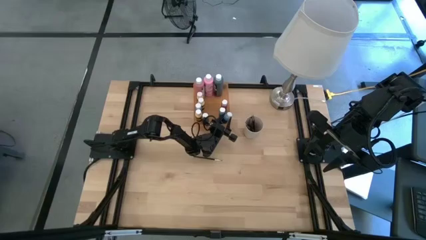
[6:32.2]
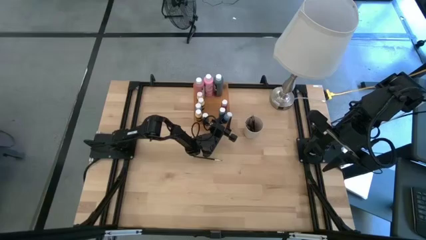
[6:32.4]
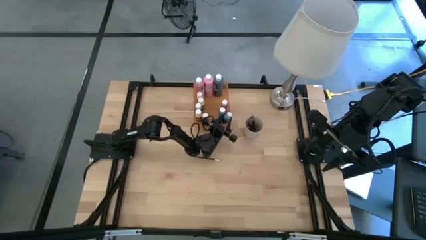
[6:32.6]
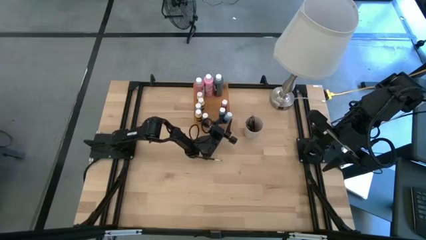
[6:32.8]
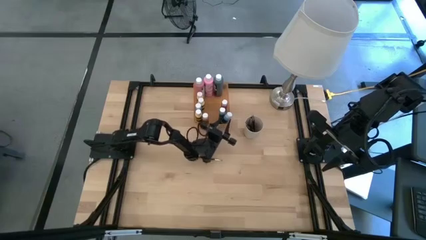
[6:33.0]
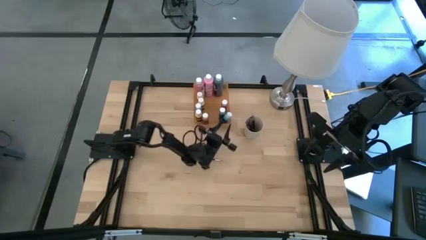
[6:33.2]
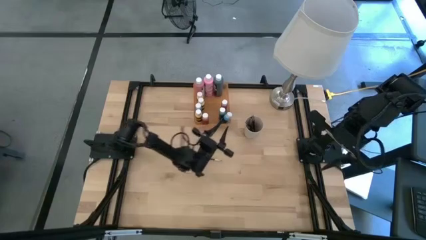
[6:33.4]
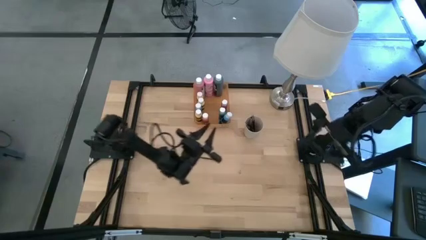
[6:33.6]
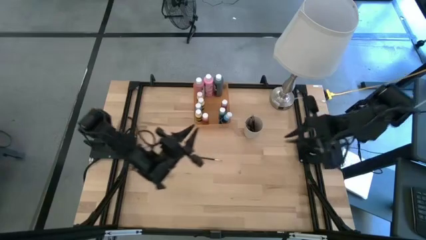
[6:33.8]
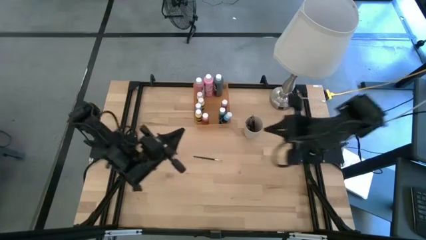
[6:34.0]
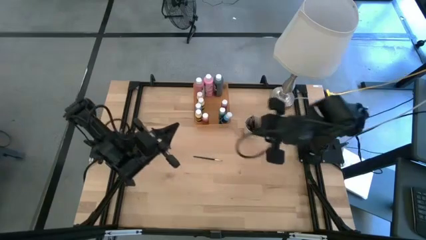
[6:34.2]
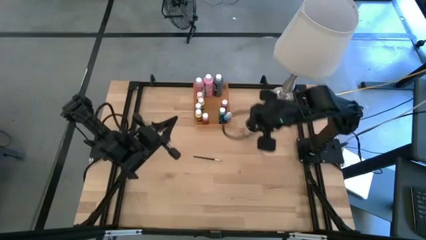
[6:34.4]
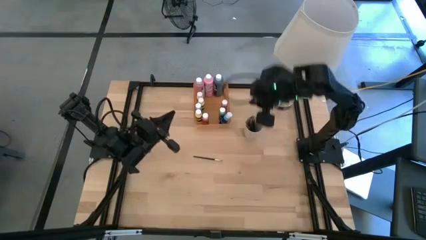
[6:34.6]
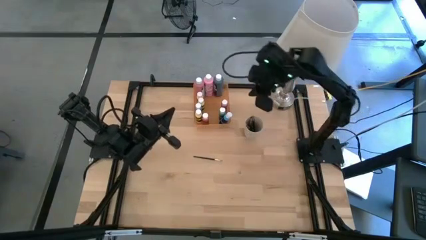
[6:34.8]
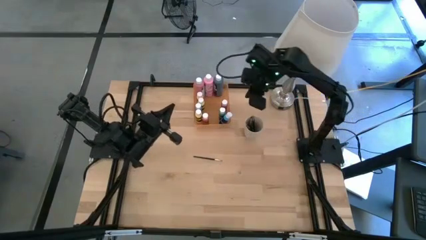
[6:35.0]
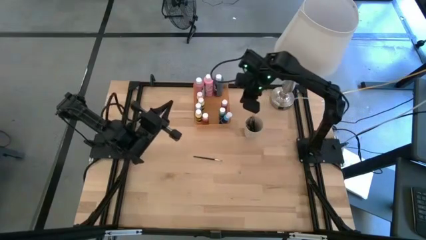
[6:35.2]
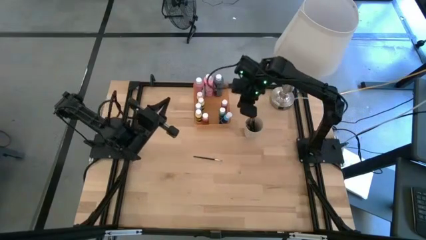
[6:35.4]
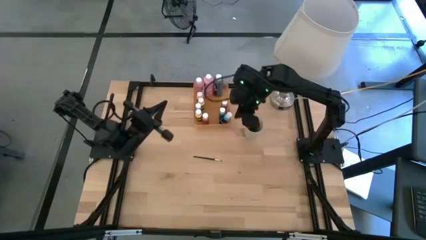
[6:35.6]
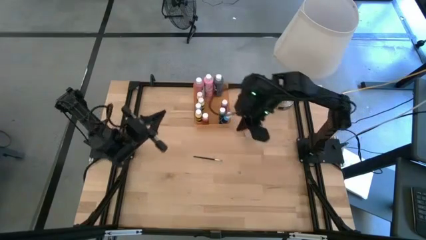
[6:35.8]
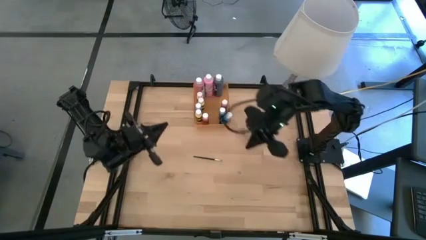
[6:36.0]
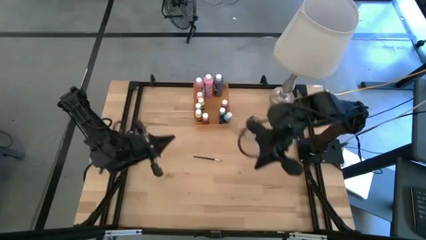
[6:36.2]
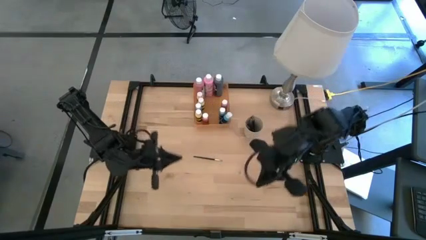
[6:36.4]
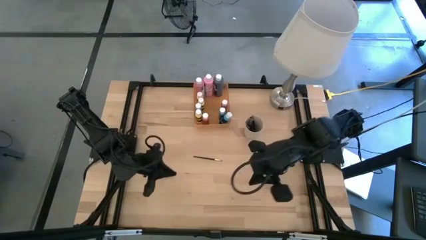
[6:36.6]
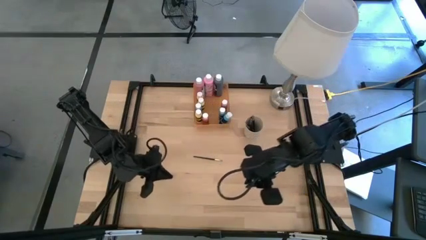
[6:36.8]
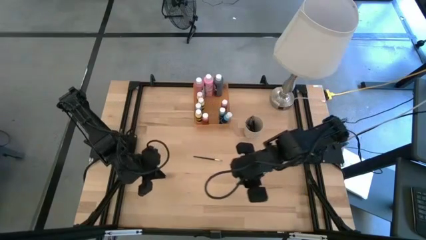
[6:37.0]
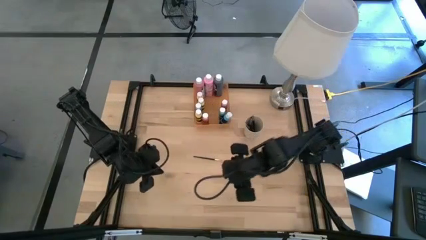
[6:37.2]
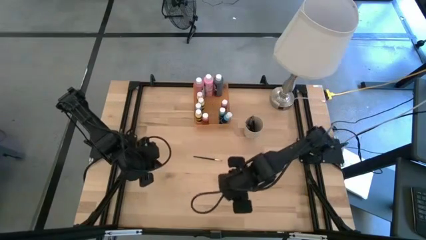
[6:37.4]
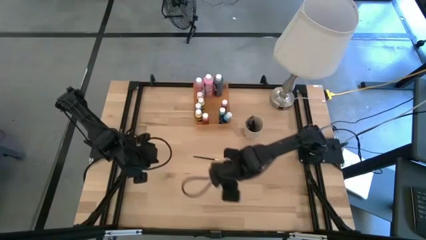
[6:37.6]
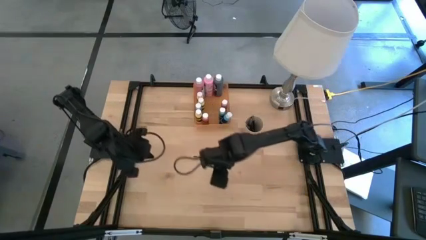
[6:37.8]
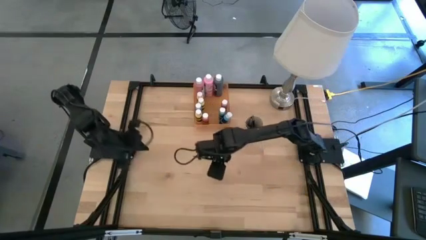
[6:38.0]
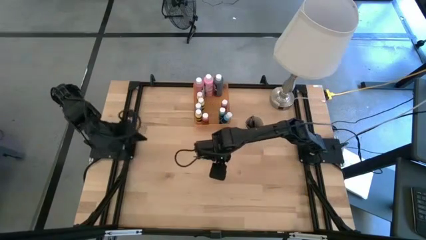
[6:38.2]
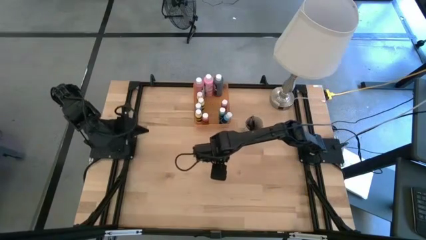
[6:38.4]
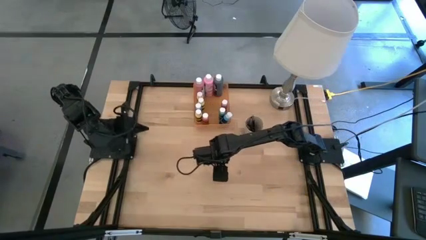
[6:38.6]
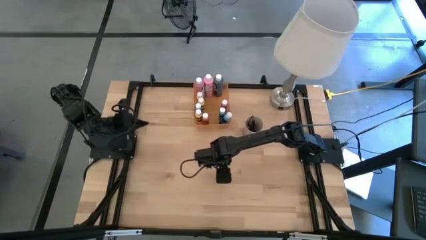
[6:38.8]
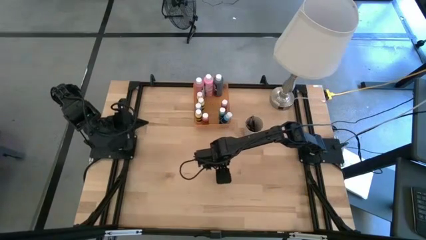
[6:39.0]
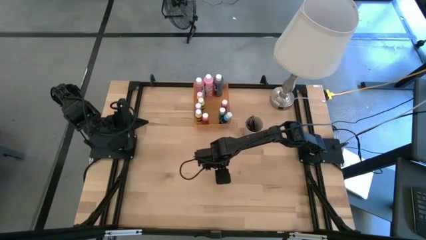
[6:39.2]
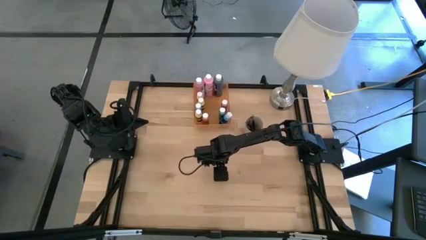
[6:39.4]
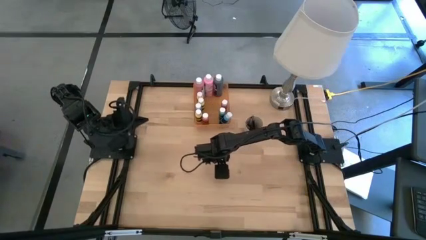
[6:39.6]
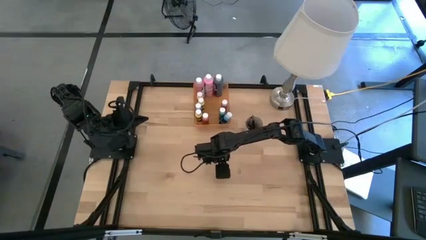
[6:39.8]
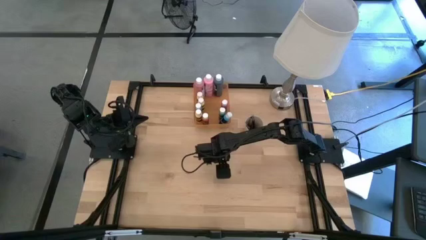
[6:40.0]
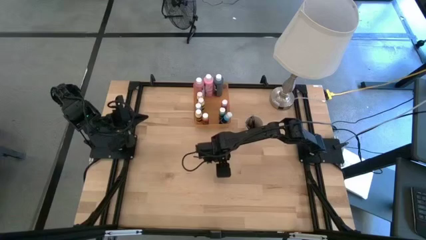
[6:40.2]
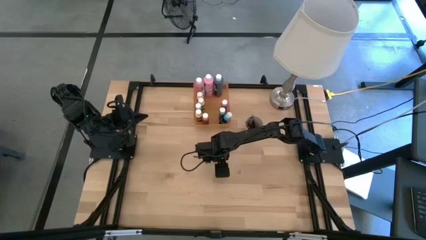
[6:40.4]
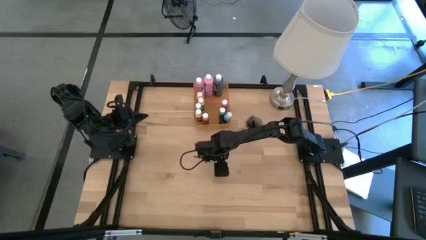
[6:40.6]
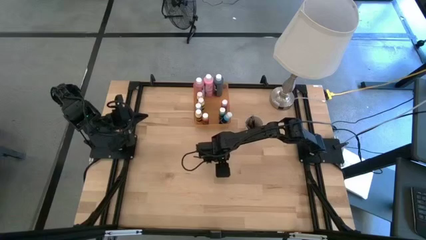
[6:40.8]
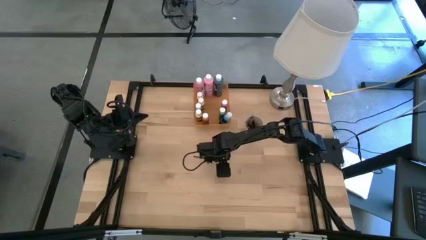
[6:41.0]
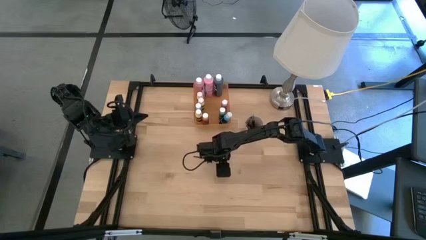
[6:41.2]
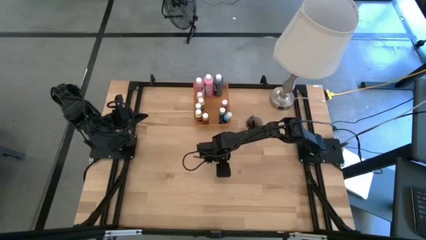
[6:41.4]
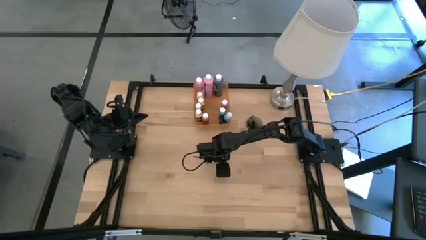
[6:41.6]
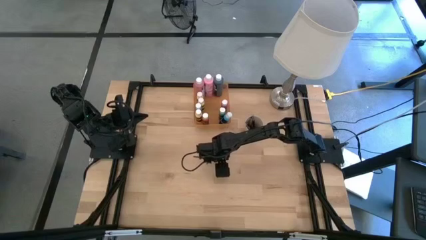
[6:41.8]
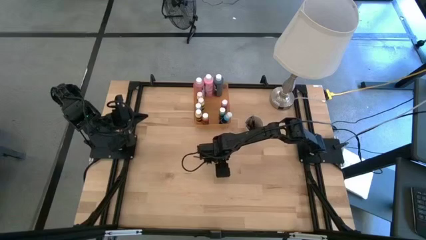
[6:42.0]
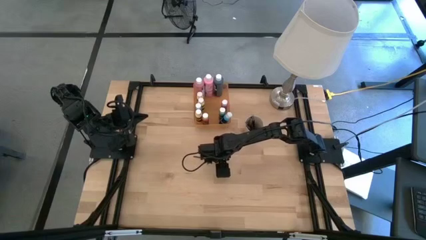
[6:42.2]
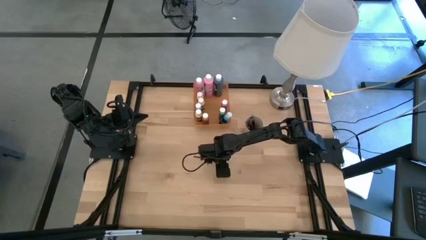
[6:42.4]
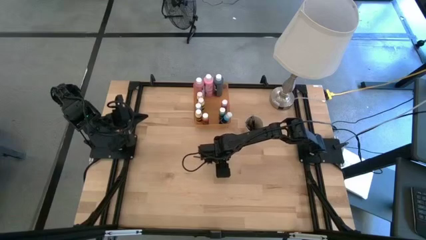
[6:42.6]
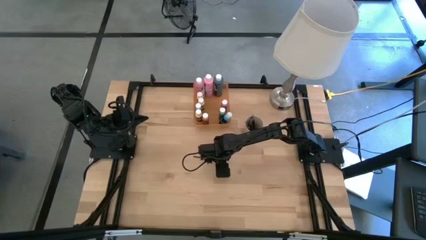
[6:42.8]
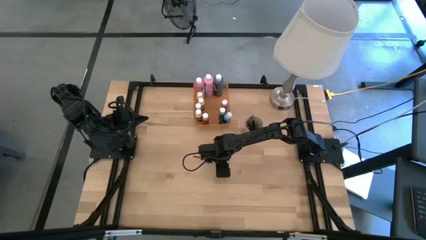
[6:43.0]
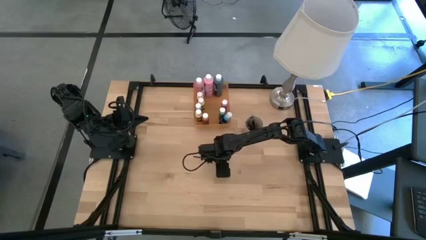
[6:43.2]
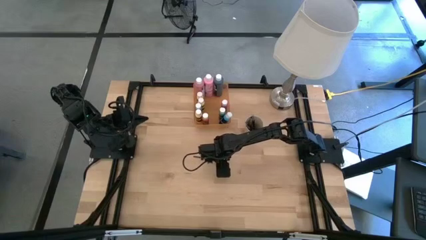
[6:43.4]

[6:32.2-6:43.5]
Task: Pick & Place Paint Supplies
Put the black paint brush into the light brown cup

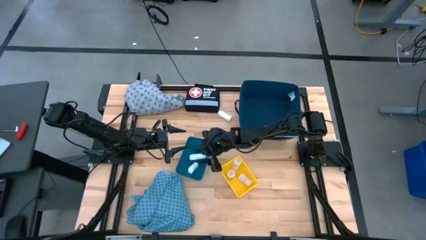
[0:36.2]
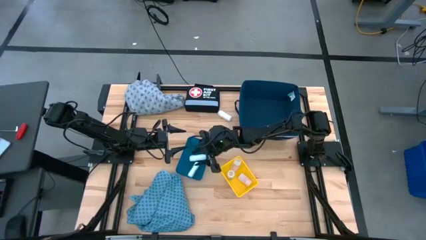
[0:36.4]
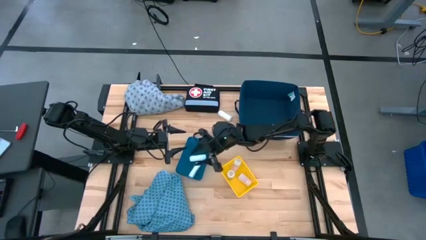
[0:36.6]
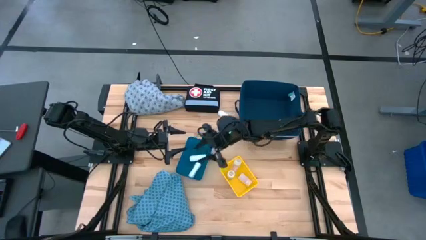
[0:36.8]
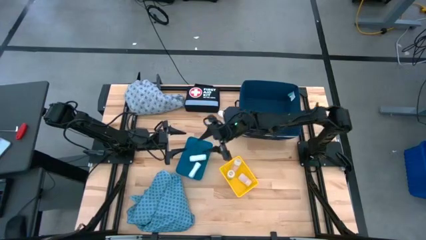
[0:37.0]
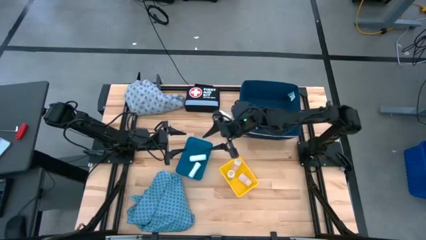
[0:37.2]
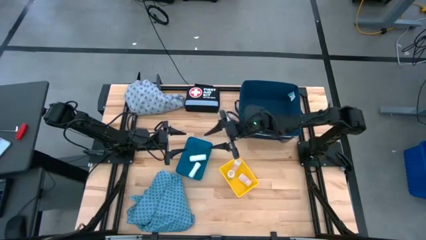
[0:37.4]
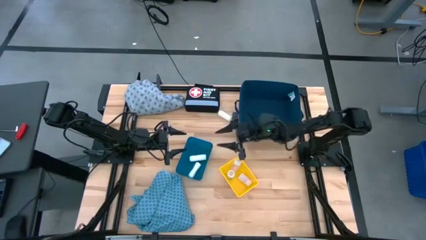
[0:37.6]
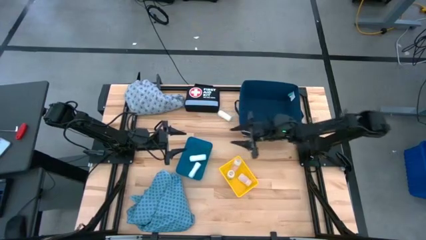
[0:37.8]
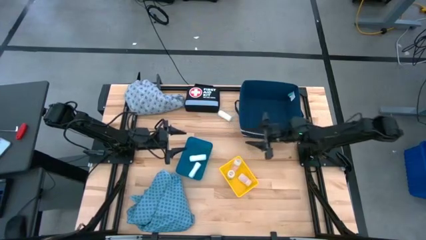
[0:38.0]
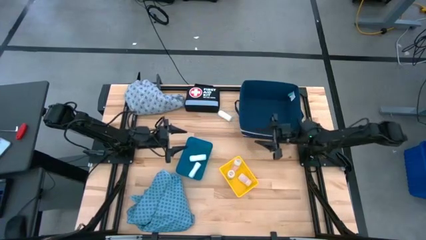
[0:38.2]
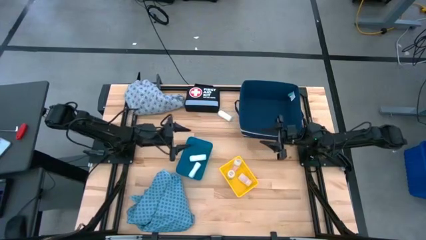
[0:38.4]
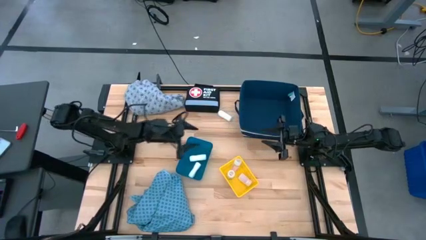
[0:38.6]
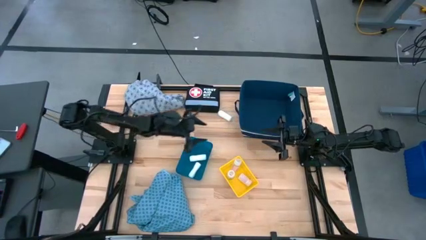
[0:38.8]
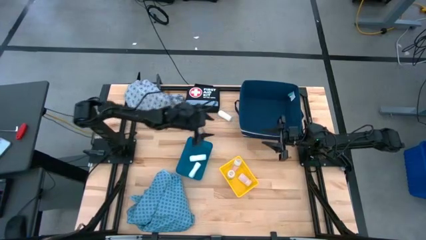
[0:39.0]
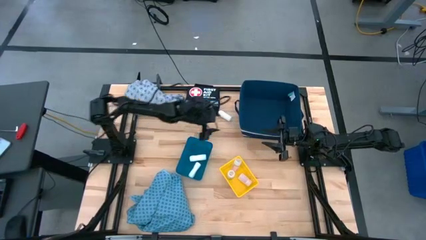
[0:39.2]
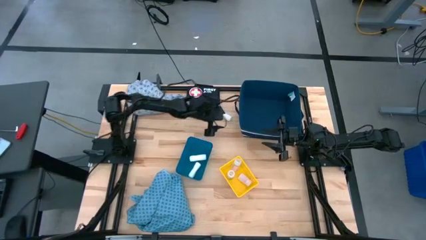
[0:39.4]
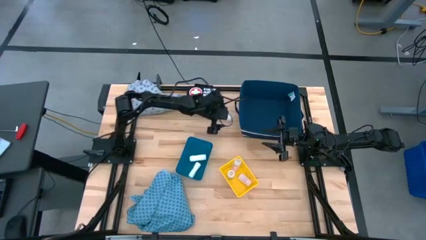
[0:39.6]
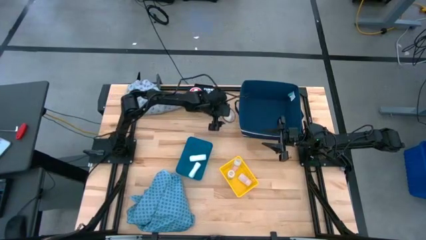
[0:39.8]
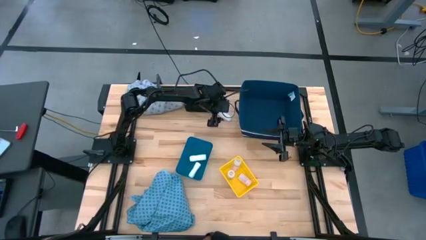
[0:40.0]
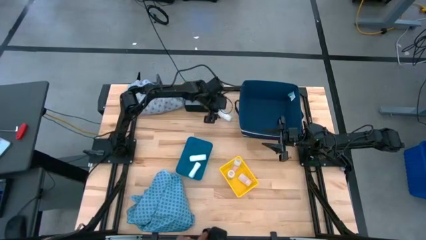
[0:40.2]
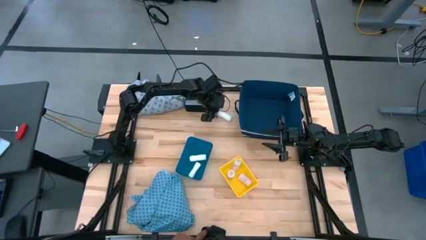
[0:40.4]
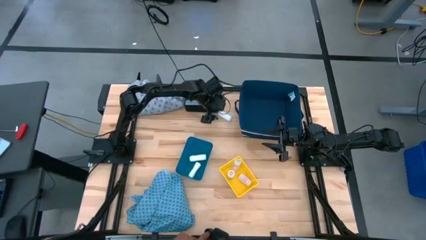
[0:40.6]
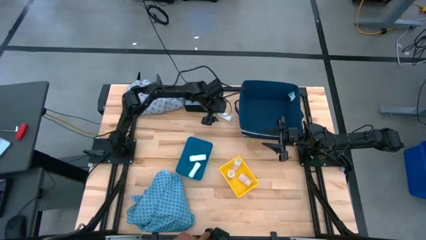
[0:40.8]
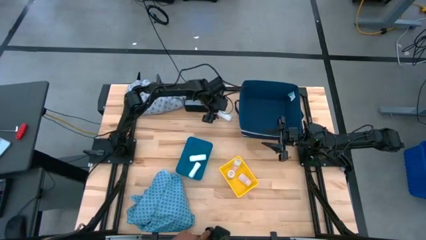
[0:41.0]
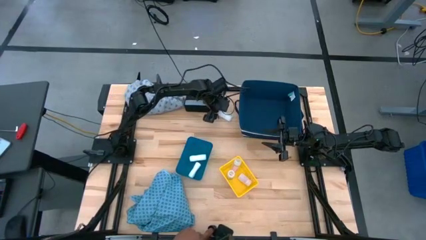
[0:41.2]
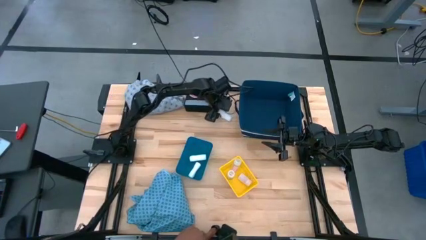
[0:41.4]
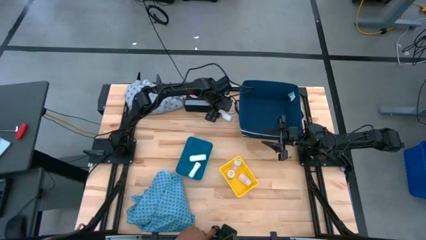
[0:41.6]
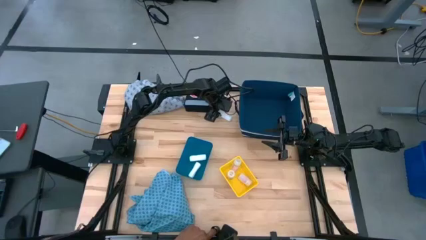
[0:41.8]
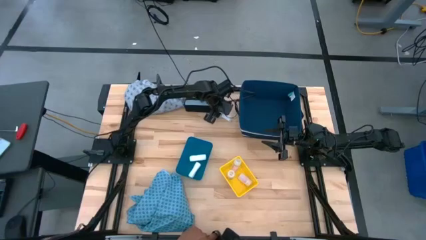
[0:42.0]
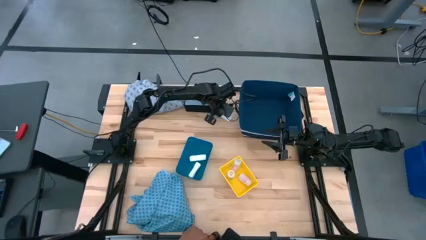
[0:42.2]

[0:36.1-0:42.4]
Task: Pick & place medical supplies in basket/bin
Put the rolled gauze into the blue bin
